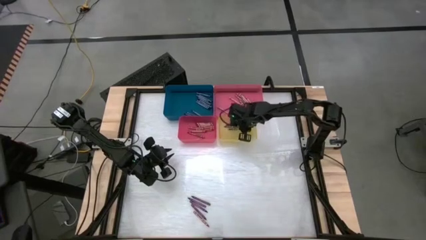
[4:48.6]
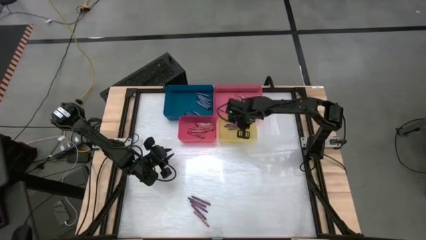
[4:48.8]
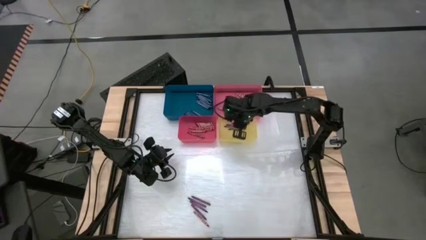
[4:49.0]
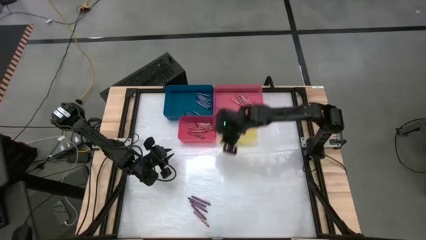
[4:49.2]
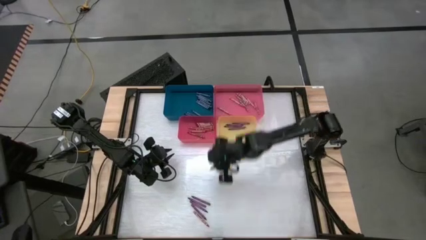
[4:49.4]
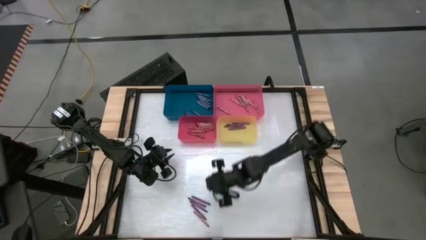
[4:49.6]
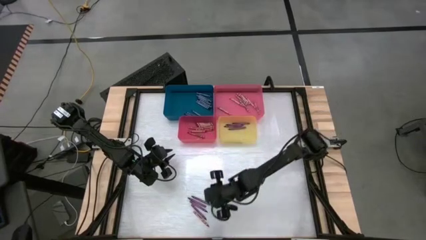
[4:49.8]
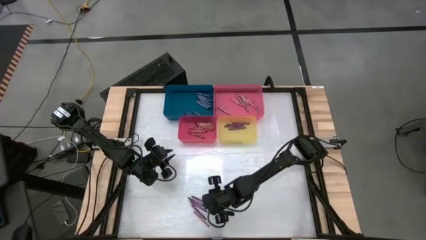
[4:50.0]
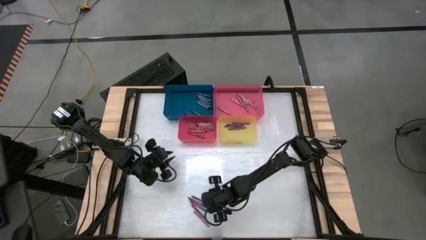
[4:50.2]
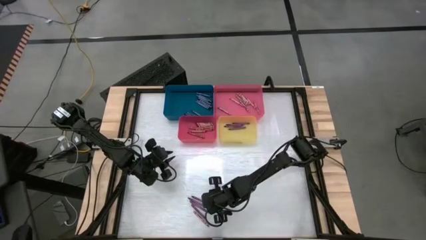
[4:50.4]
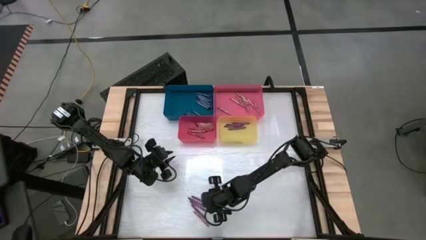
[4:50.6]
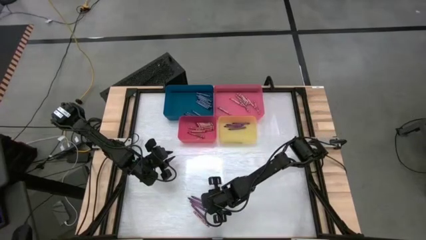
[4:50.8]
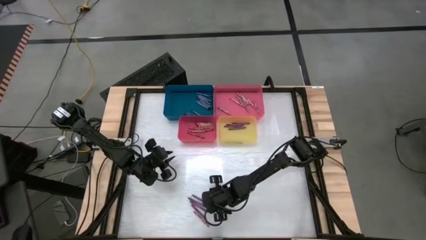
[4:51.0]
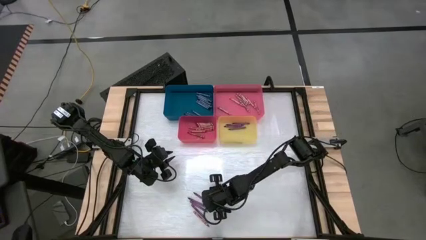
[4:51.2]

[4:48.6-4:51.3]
Task: Sort crayons
Put the violet crayon into the yellow bin

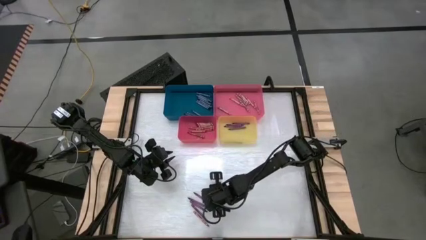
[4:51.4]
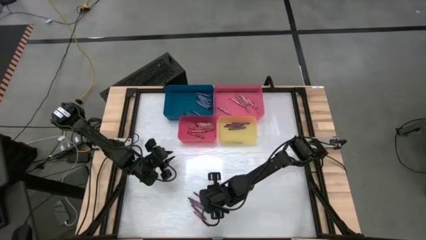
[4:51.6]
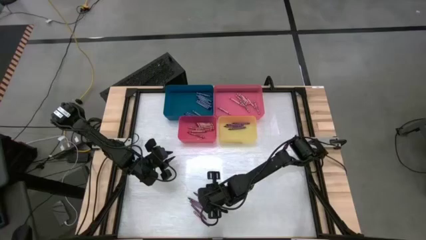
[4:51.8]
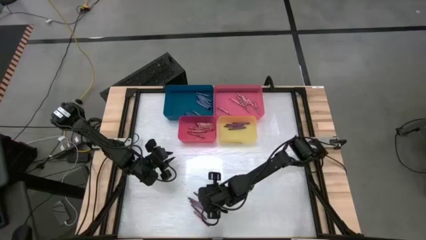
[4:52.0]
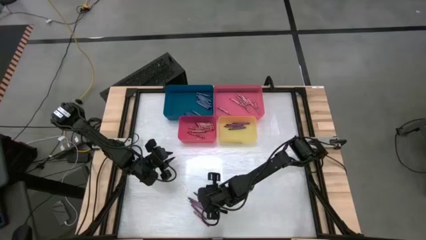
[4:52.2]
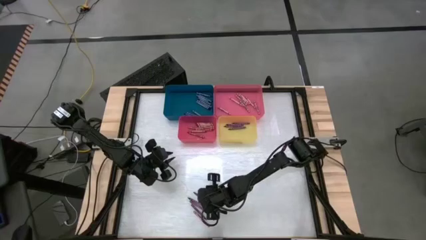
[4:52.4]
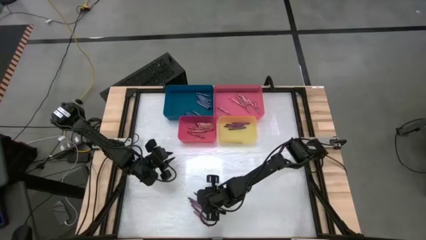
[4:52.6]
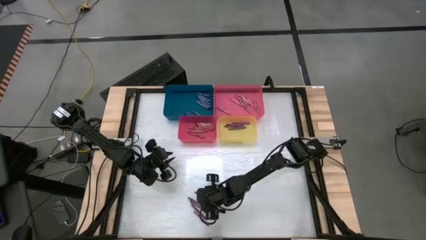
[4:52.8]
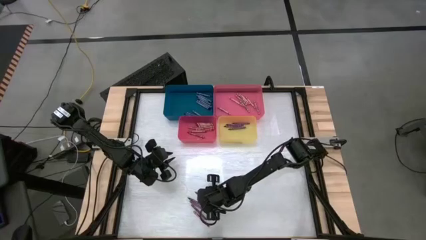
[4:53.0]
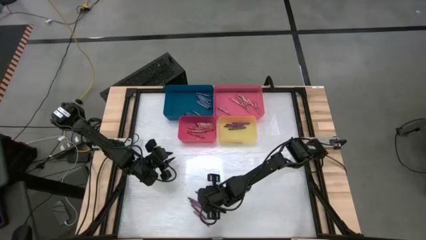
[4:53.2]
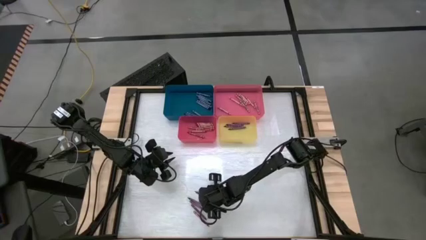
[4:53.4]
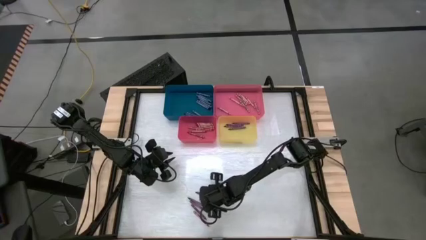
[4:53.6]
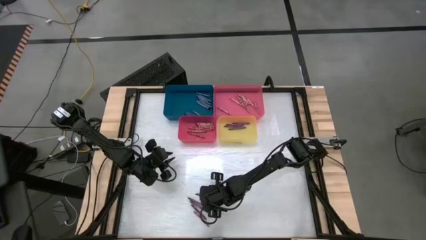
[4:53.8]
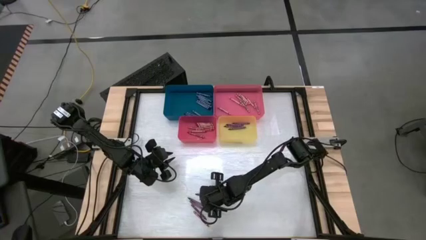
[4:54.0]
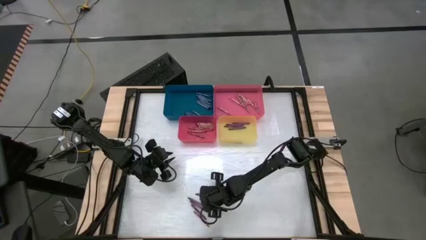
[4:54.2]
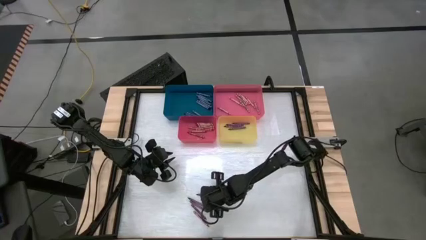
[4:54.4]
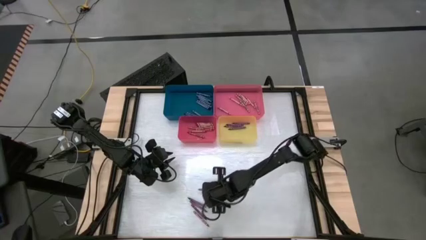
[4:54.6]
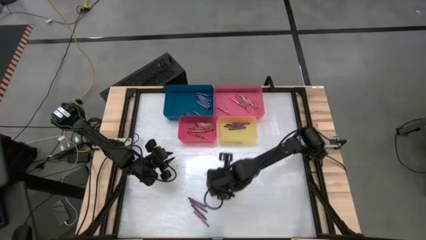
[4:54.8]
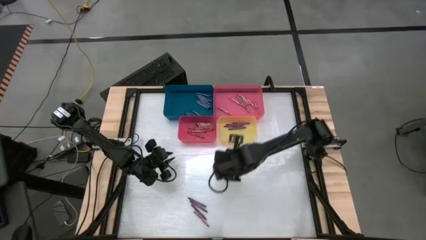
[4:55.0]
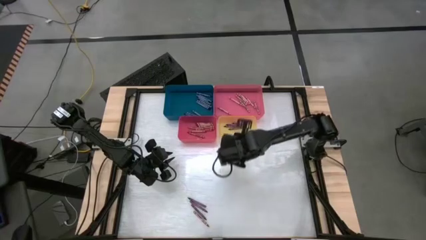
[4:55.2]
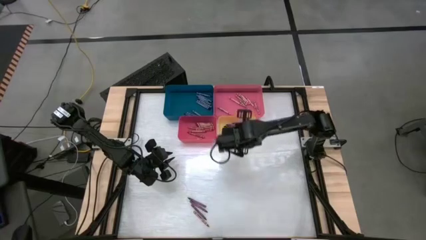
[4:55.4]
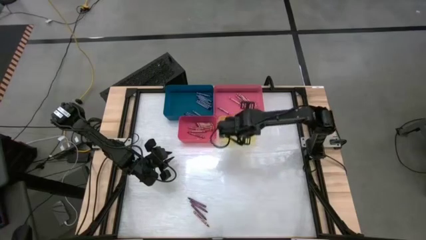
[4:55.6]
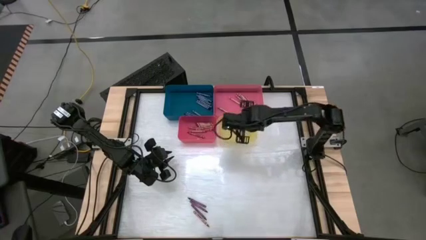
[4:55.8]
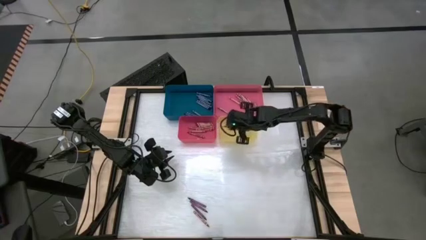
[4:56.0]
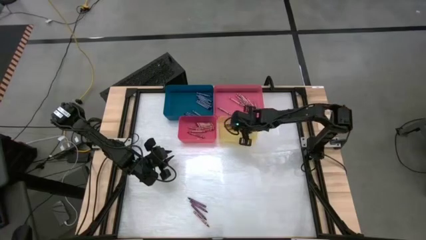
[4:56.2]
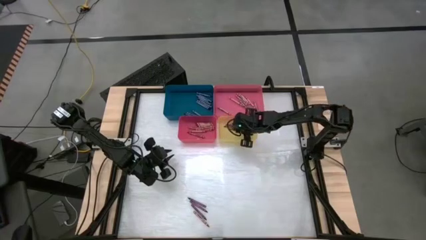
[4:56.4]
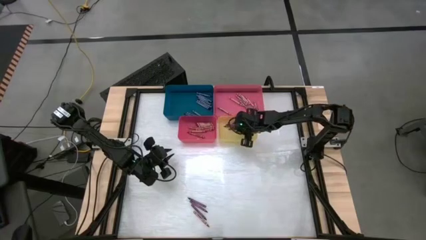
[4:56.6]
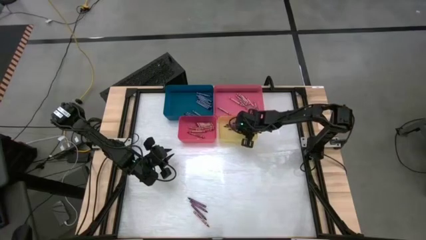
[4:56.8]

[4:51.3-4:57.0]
Put the violet crayon into the yellow bin

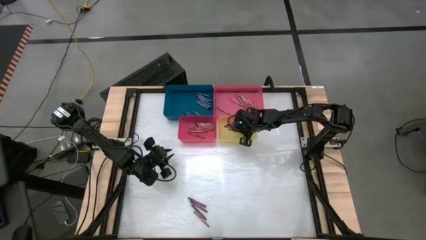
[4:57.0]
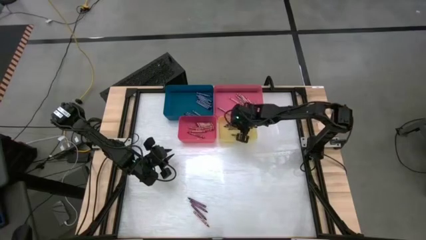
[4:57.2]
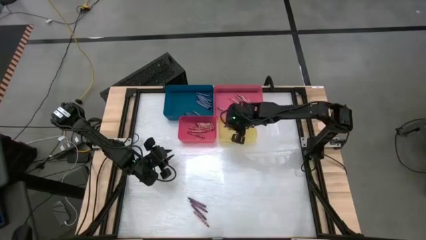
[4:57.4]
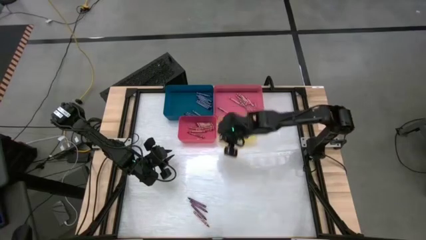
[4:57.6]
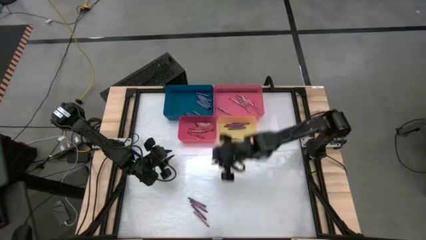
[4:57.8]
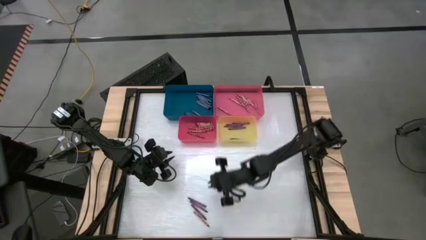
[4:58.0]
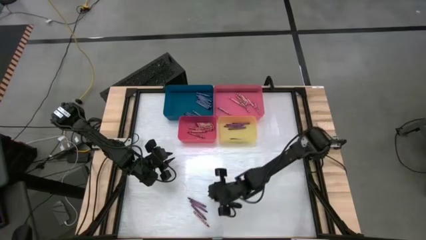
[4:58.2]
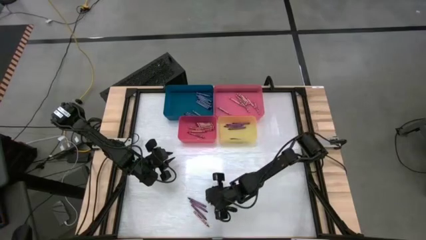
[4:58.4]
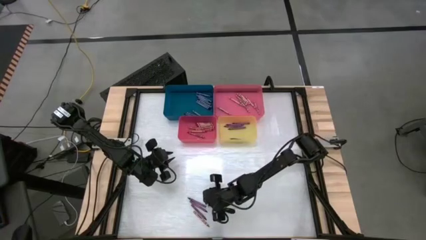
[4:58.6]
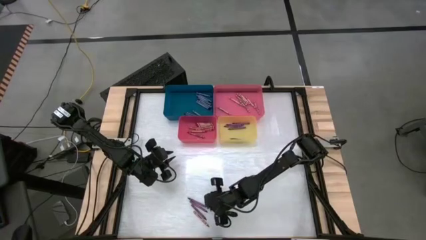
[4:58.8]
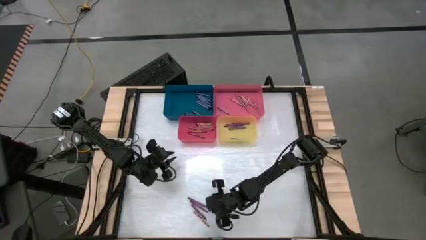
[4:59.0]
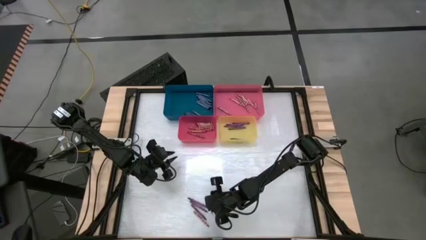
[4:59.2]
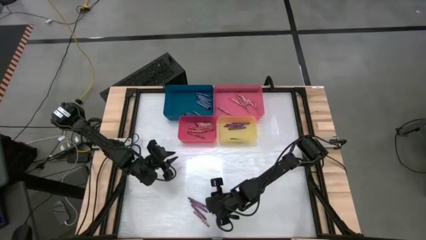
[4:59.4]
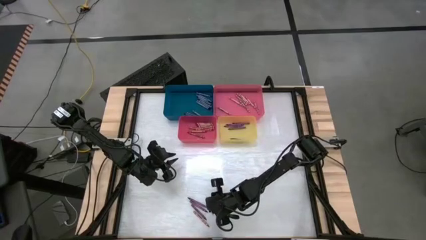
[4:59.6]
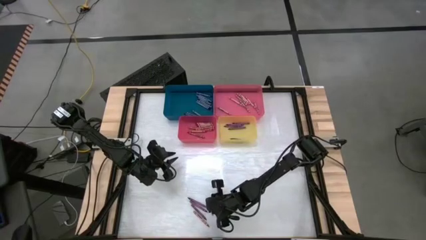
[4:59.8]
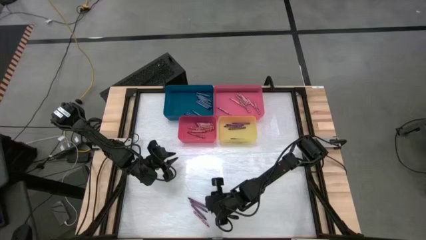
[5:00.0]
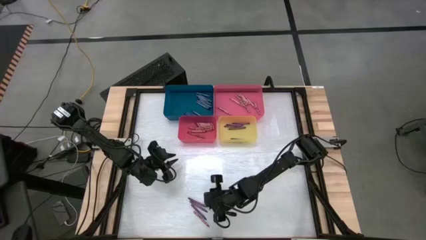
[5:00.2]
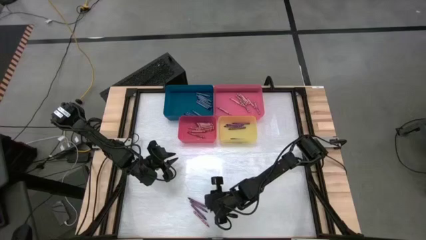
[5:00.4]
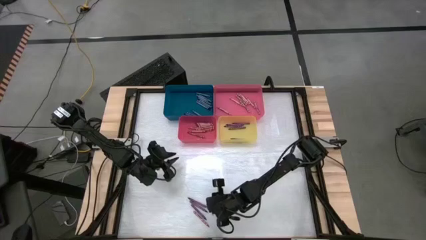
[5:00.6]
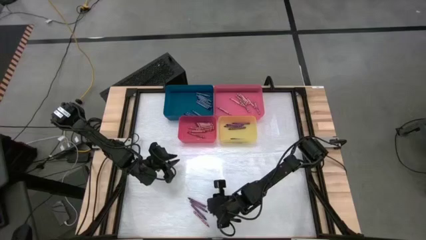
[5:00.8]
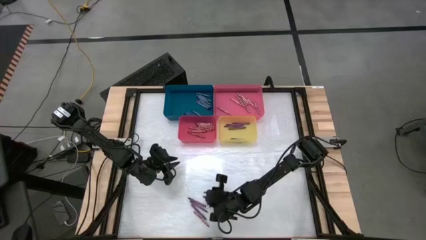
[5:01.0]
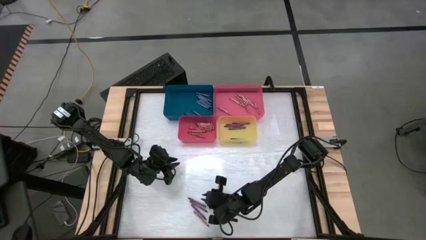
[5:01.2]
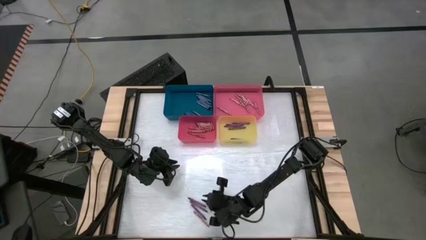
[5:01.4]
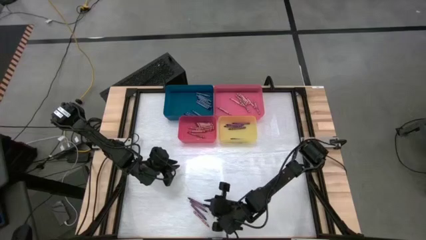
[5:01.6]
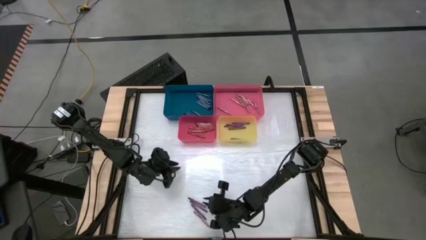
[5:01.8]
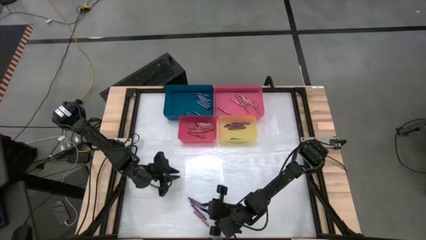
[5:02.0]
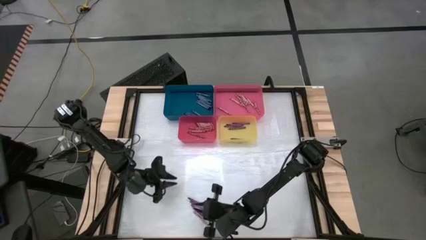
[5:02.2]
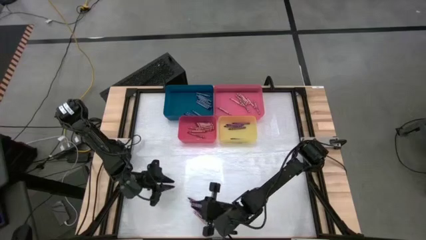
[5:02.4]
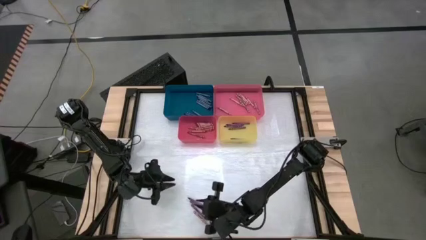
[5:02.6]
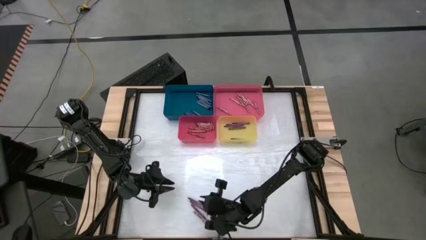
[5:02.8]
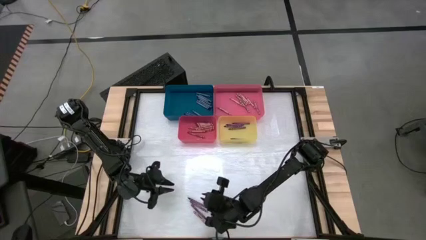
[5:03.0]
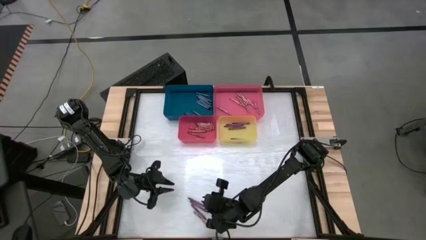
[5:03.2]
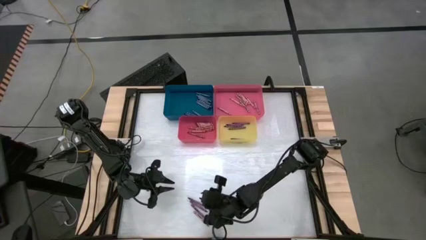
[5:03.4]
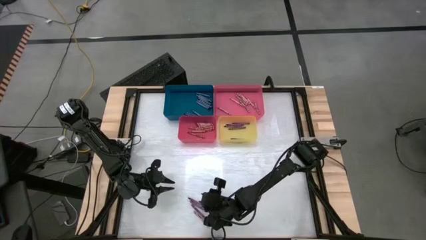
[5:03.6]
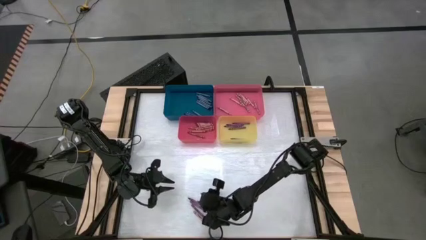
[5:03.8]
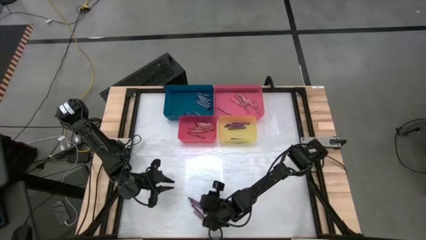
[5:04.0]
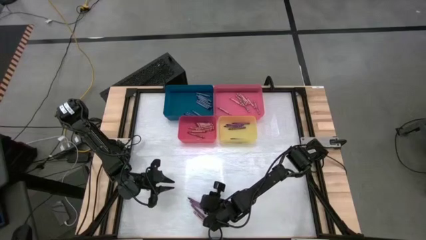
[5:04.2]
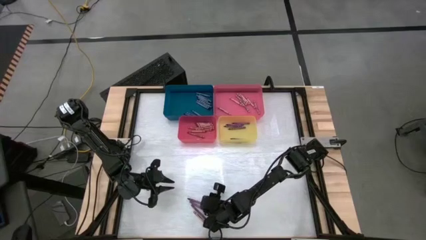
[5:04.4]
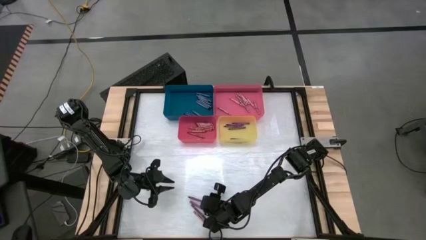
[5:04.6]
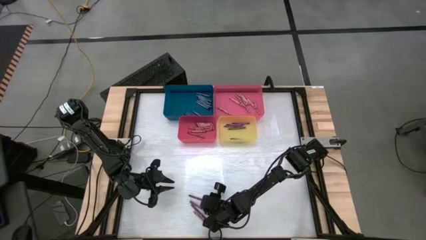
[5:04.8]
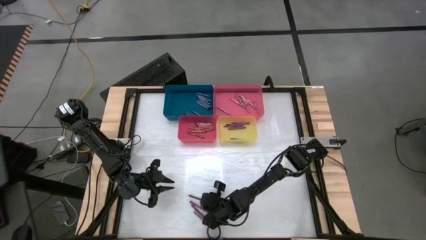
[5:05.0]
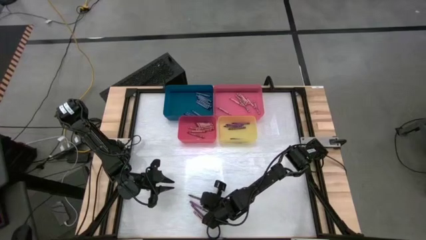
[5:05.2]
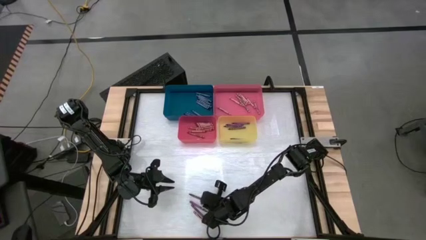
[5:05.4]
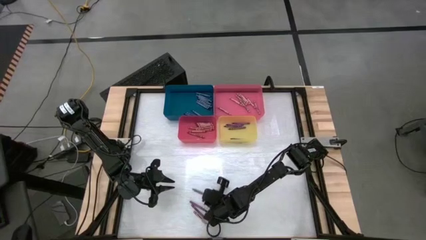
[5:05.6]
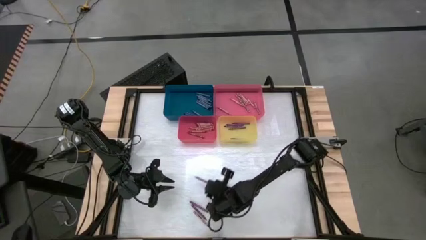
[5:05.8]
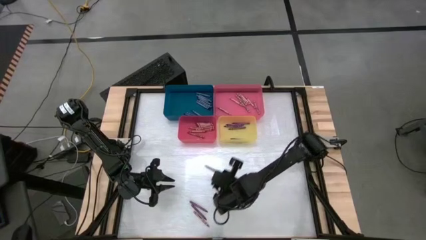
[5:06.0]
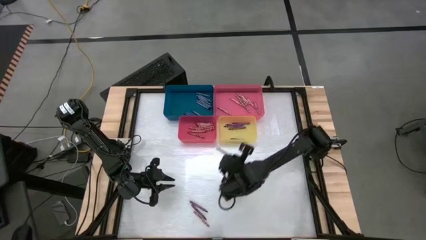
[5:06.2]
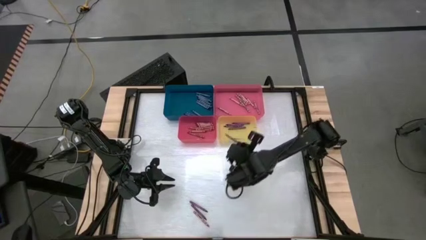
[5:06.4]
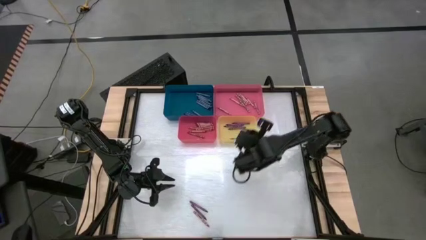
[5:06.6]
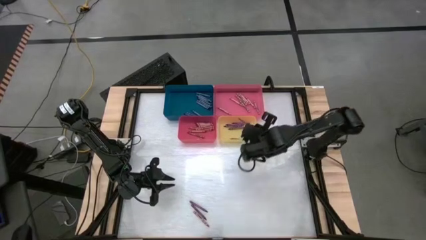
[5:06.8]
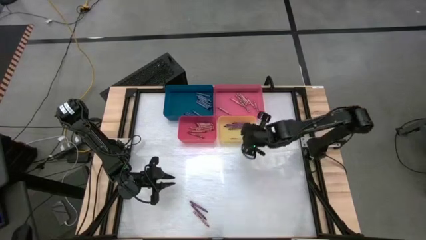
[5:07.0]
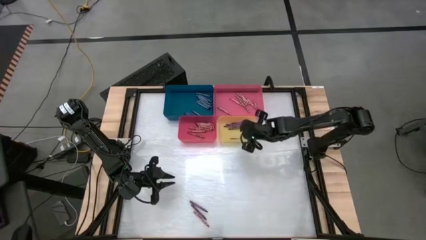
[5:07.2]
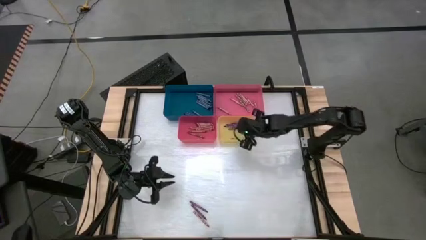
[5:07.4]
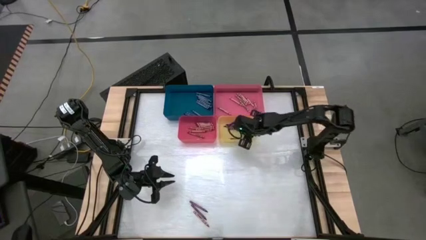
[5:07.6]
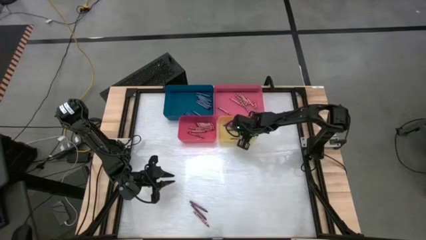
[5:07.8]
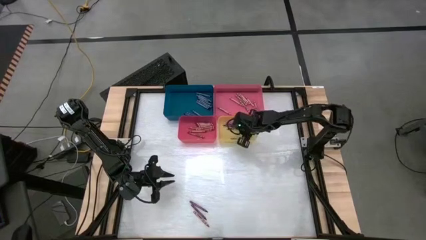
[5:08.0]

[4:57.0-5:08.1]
Put the violet crayon into the yellow bin
